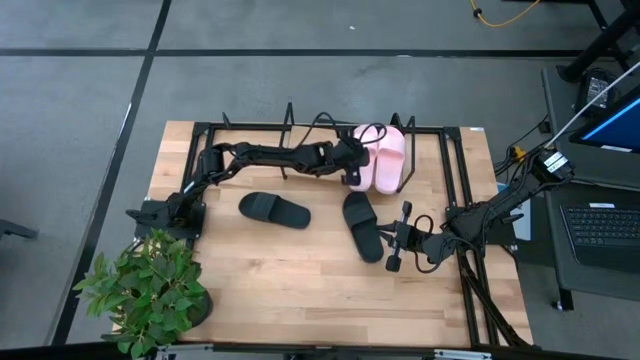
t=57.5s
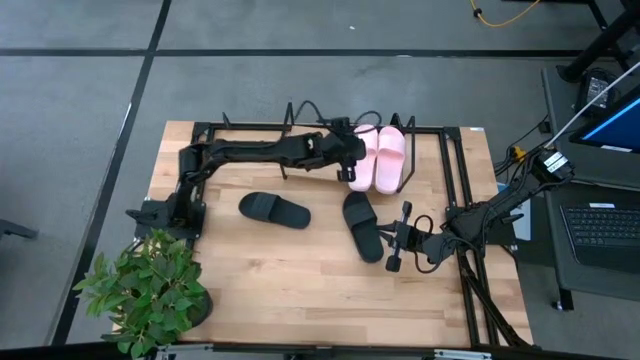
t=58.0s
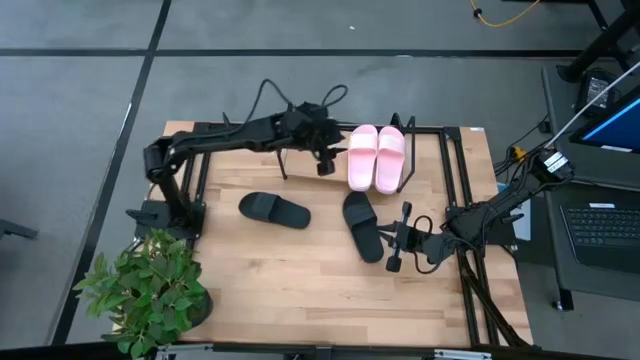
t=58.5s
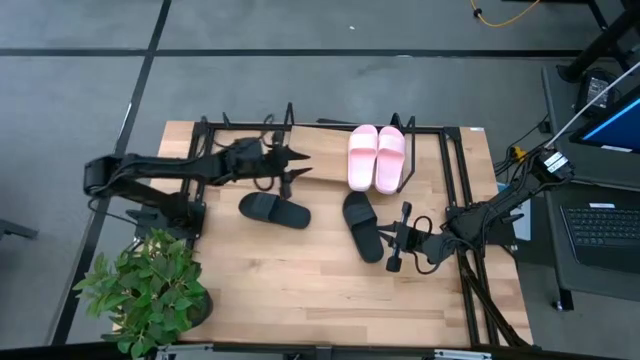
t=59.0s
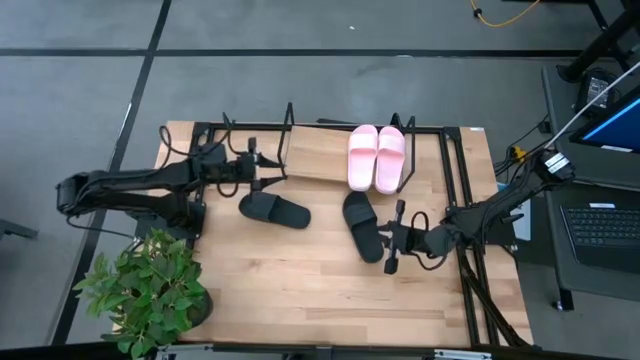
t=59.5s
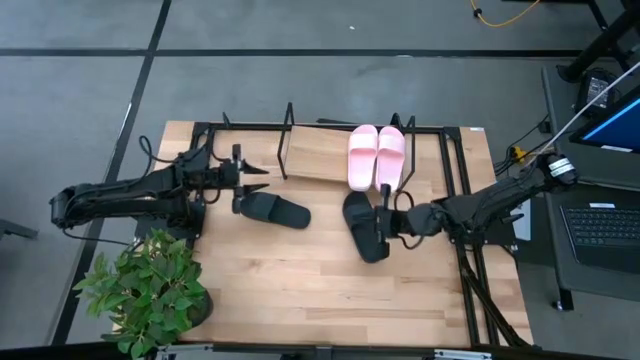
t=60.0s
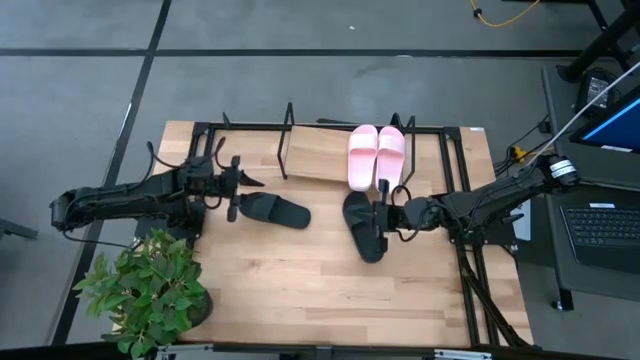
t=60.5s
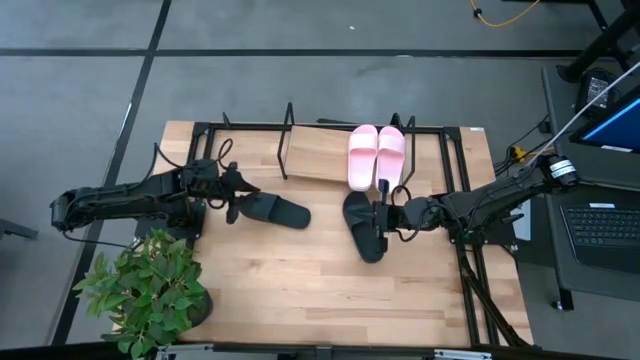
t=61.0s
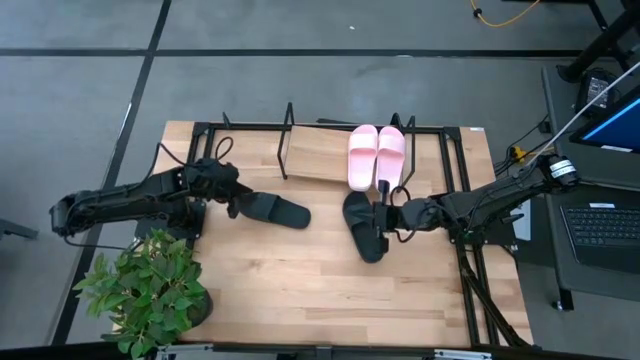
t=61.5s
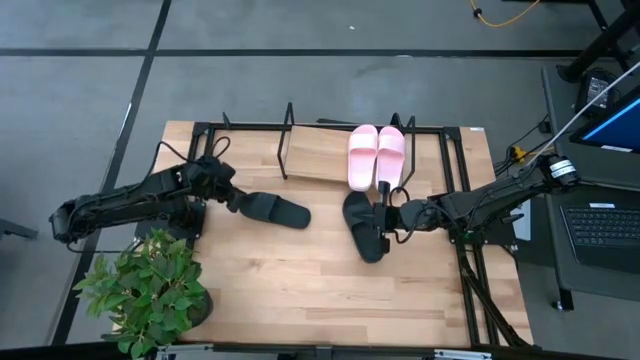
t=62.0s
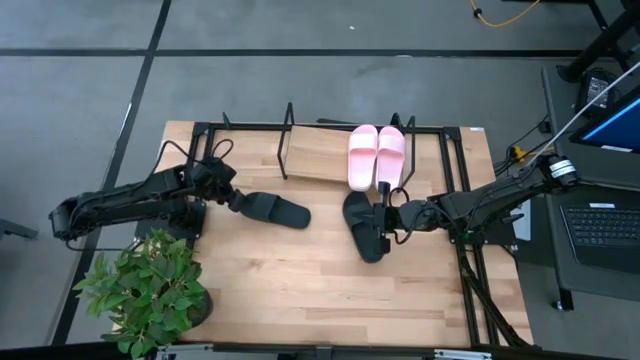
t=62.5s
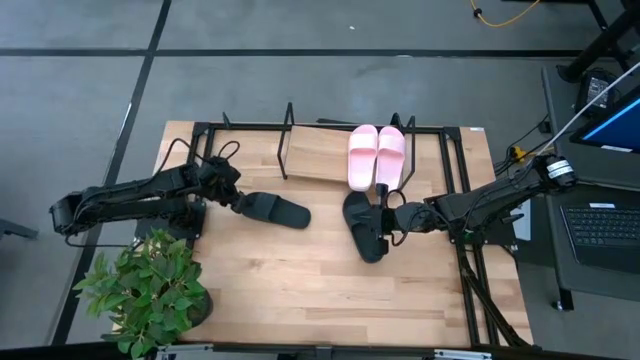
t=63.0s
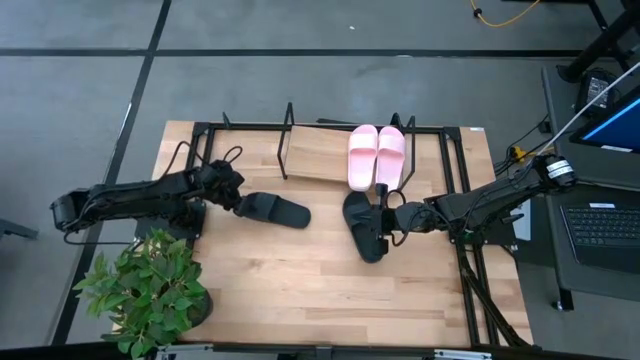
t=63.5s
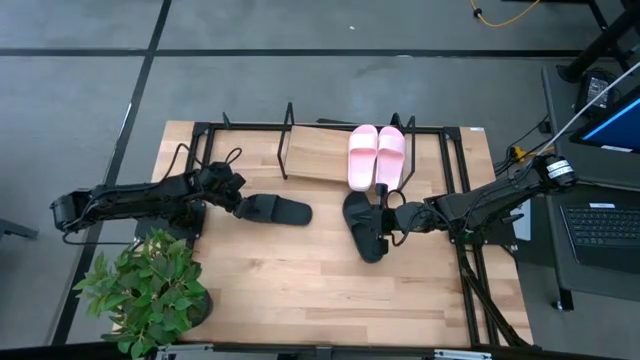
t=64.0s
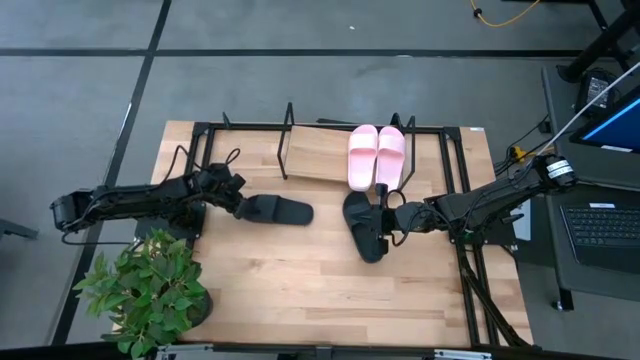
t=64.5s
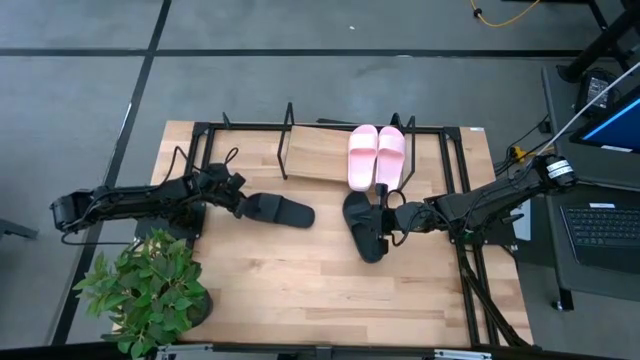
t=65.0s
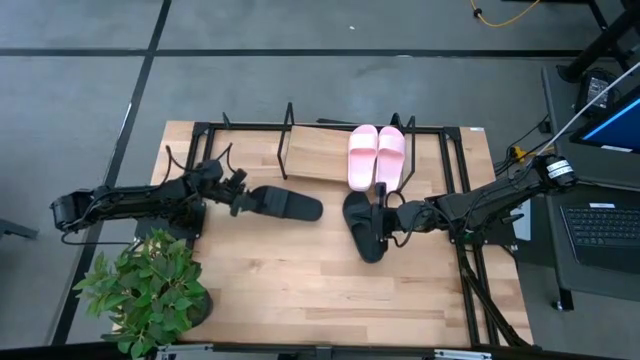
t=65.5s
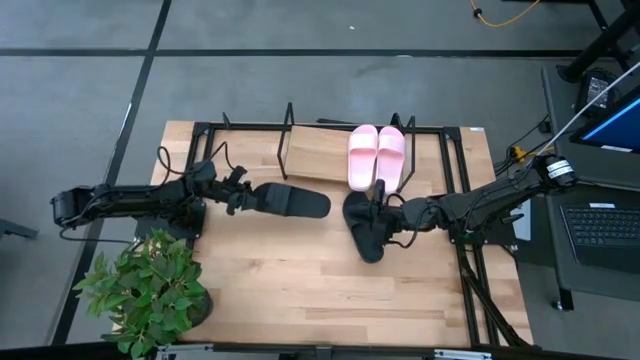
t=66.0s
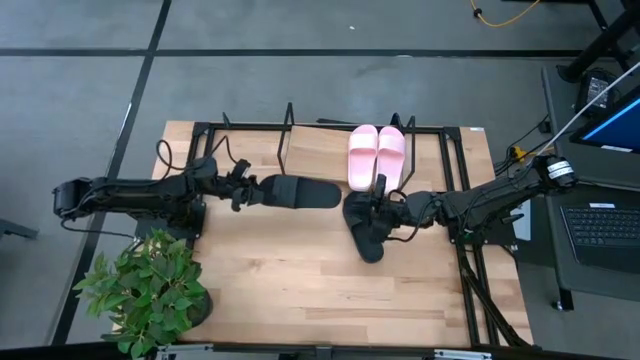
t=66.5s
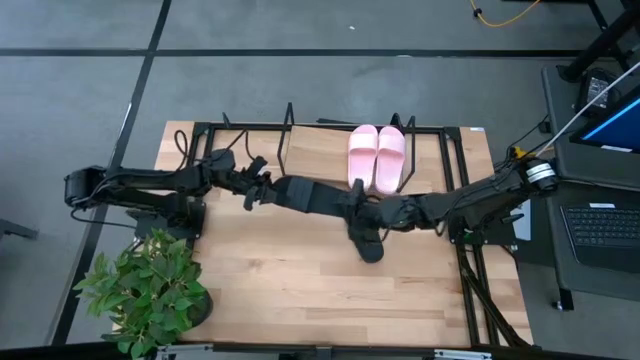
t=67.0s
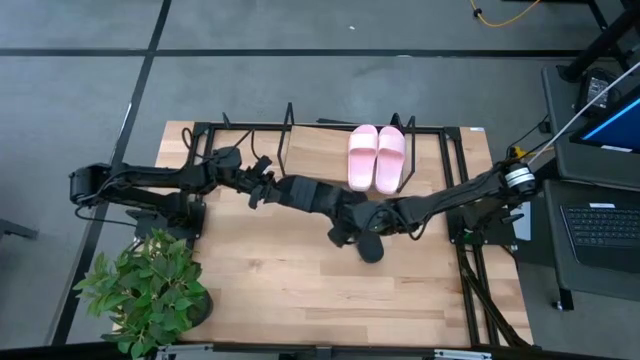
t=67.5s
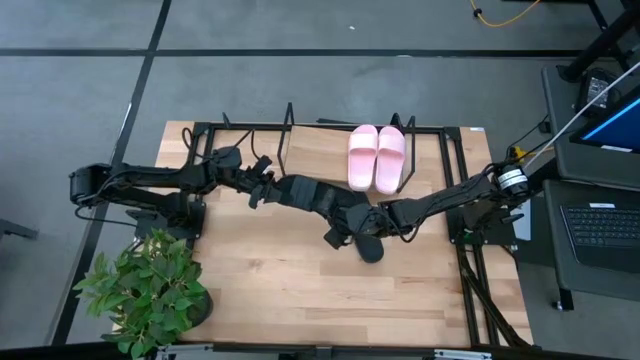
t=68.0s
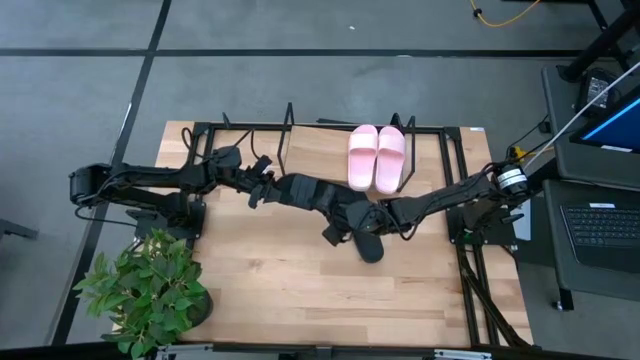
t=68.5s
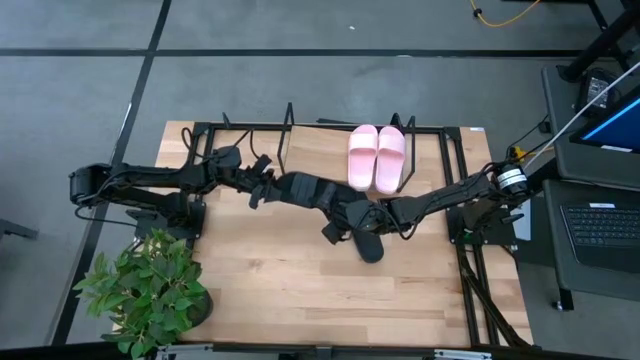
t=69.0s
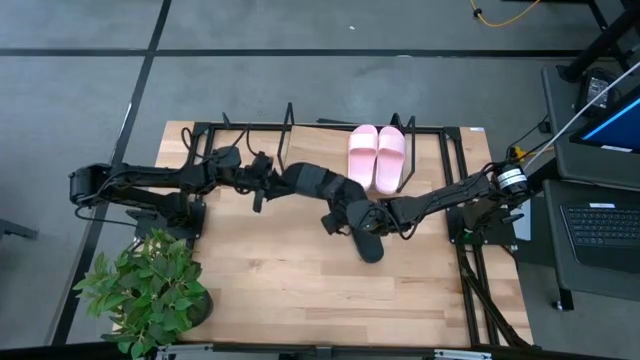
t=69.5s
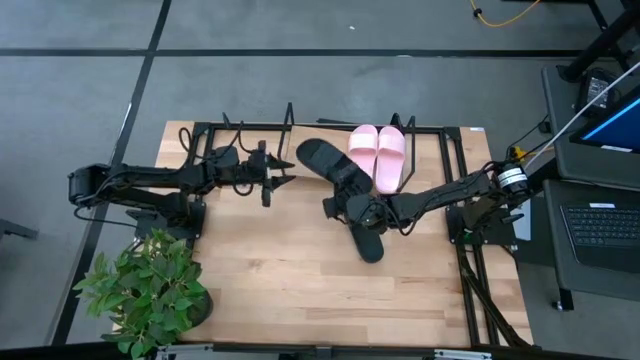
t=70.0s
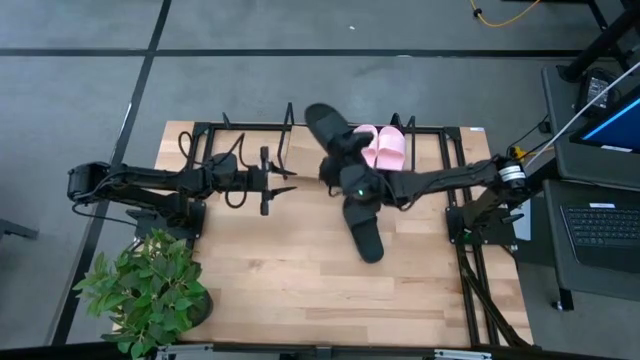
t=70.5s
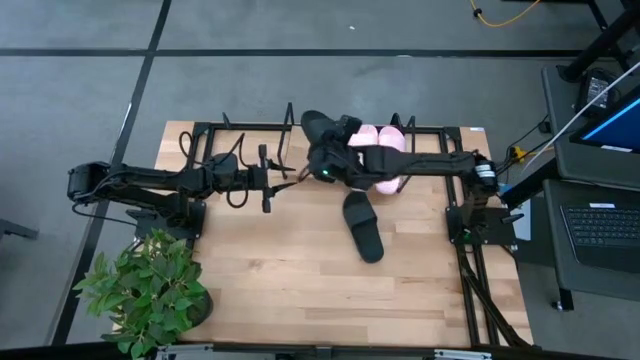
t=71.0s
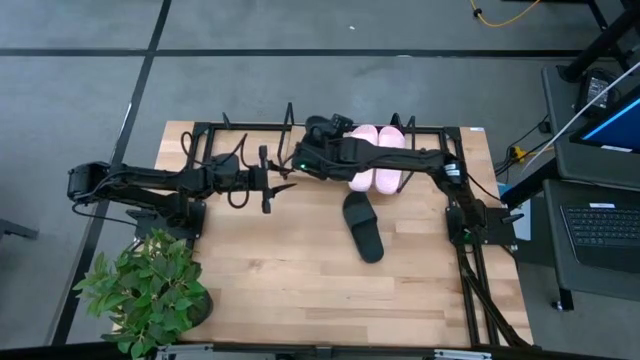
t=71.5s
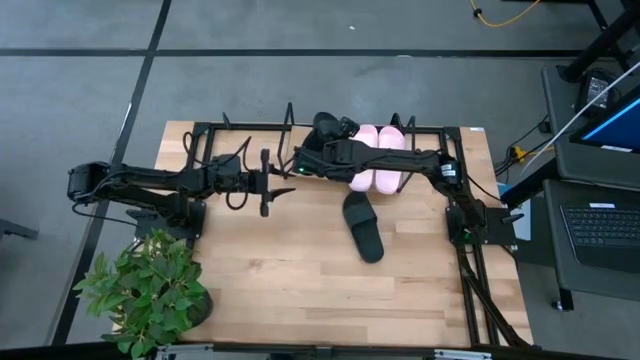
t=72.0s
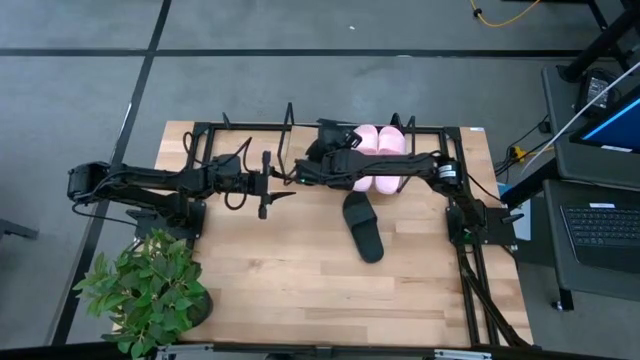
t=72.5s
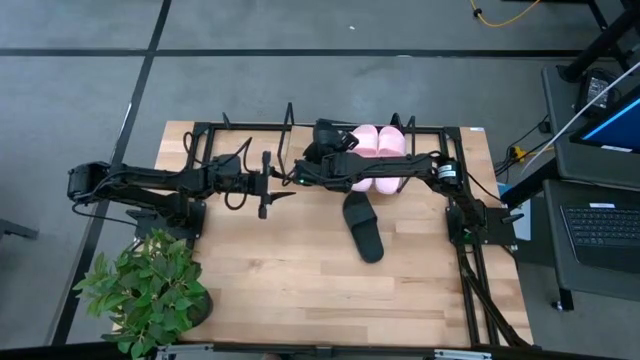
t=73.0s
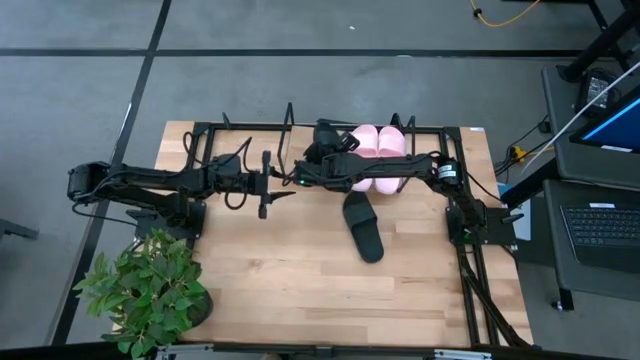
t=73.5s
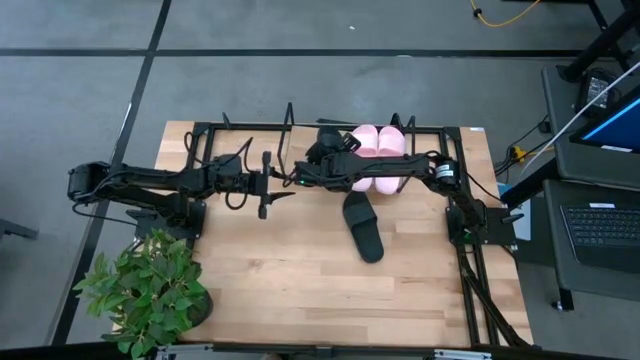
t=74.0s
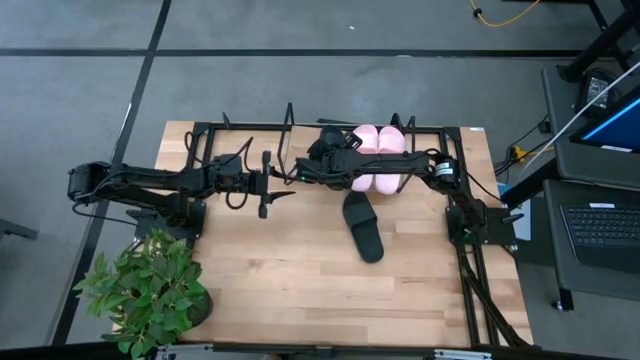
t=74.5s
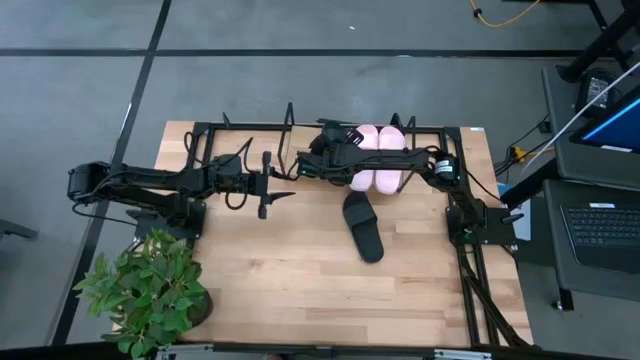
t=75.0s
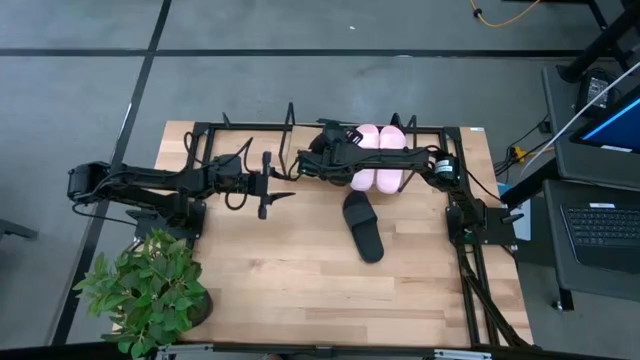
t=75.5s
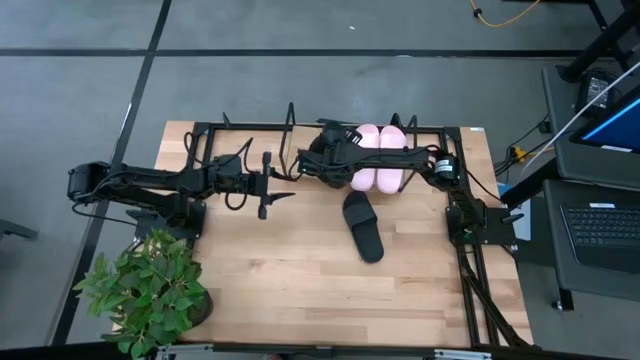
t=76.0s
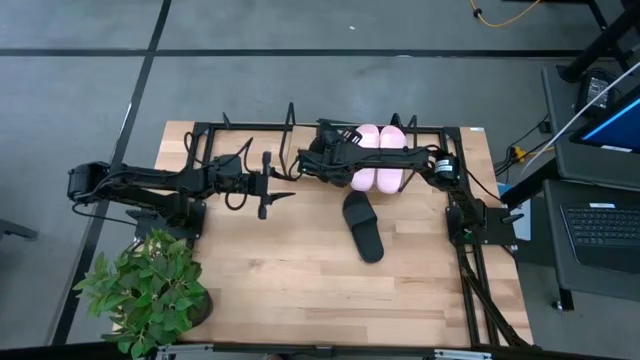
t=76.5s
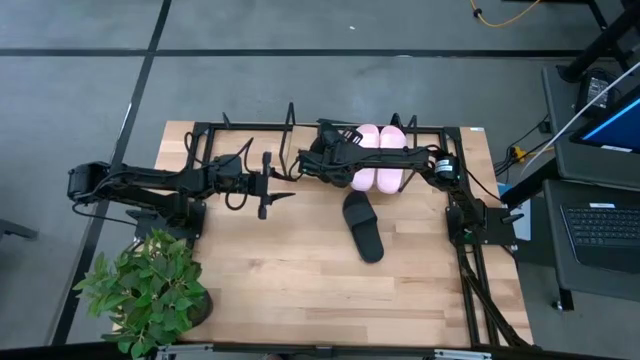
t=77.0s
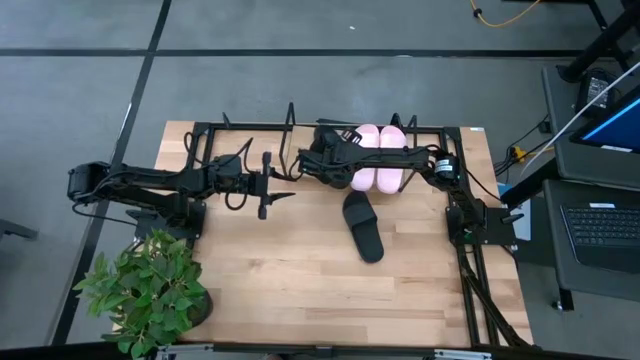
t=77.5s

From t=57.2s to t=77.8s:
Task: Pick and place slides into the shelf
Put the left black slide on the shelf

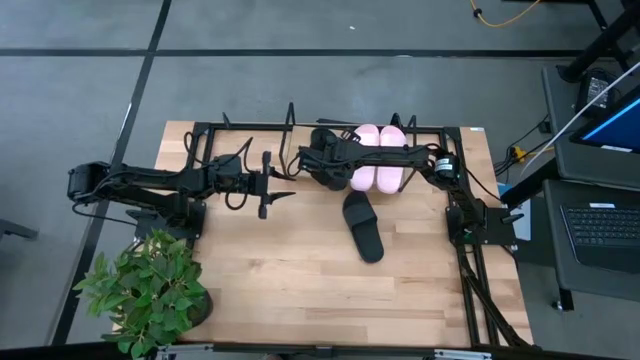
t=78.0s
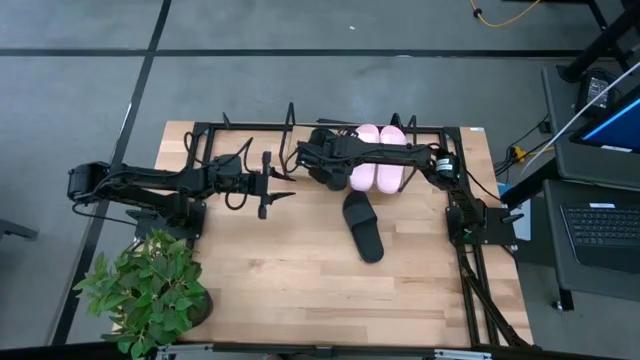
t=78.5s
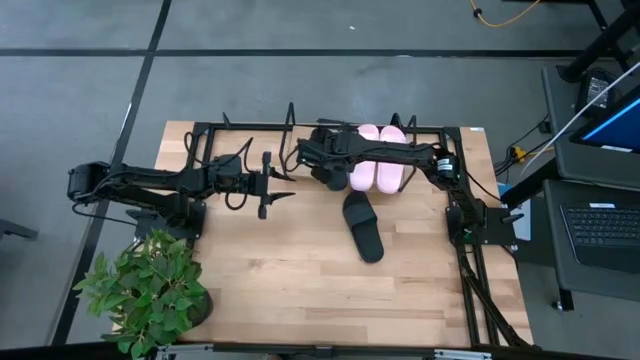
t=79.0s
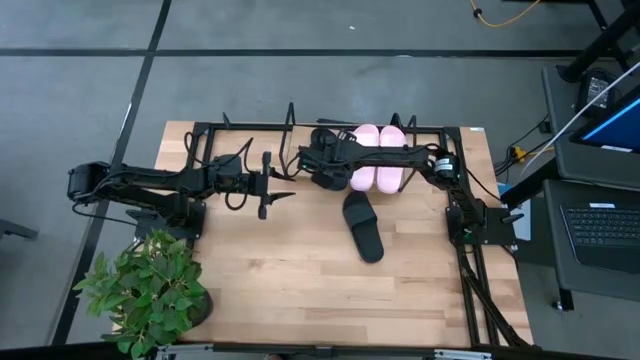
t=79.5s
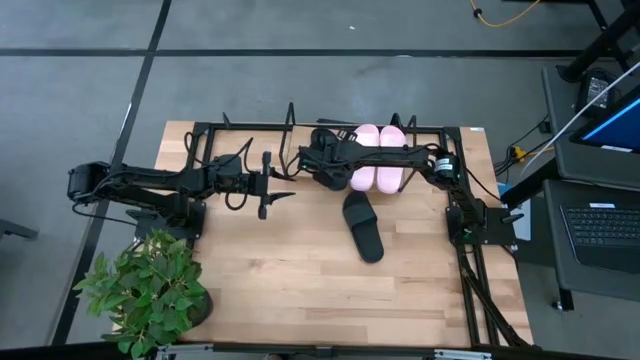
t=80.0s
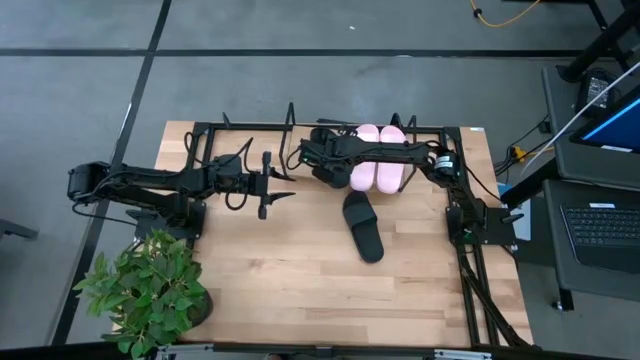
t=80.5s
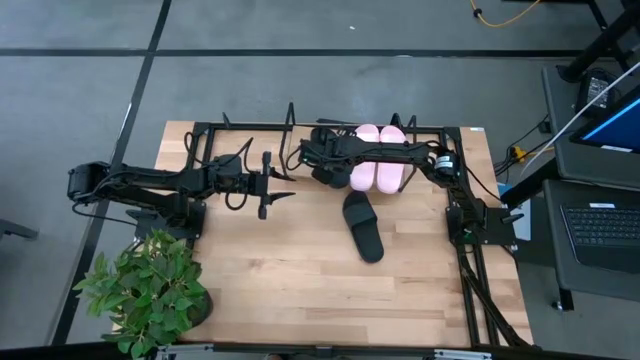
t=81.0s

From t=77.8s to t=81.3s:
Adjust the black slide on the shelf
